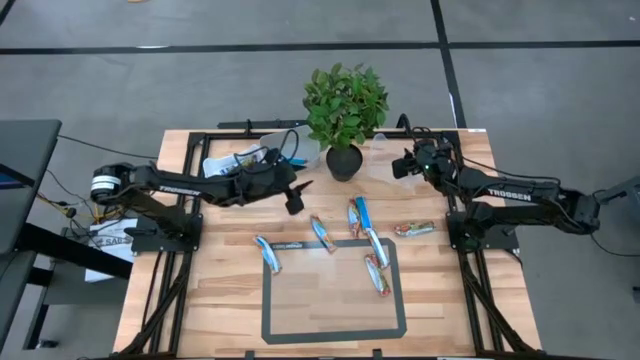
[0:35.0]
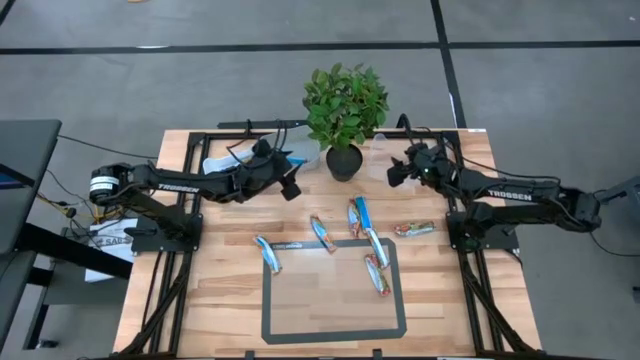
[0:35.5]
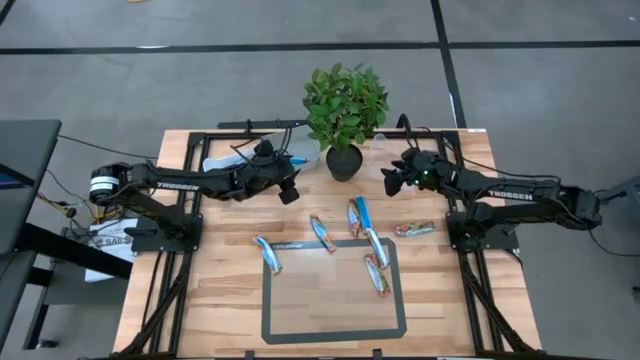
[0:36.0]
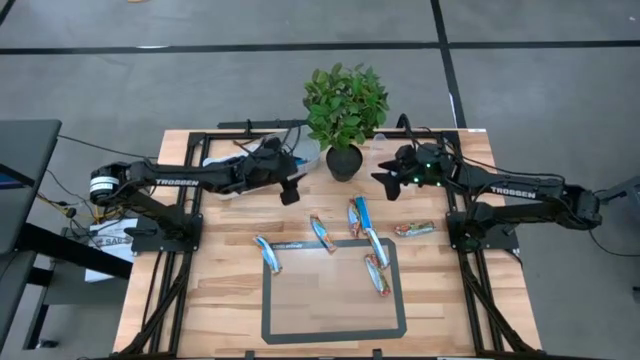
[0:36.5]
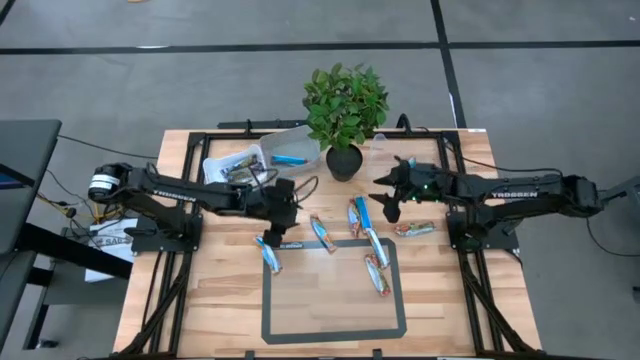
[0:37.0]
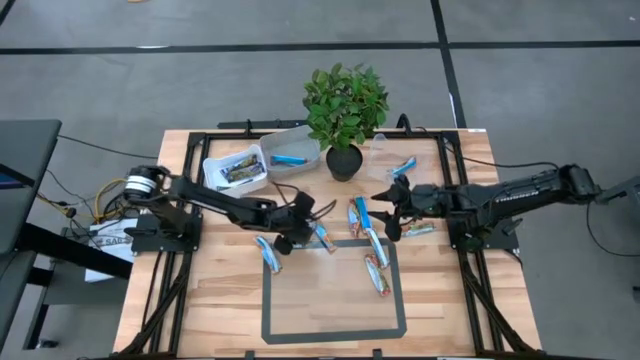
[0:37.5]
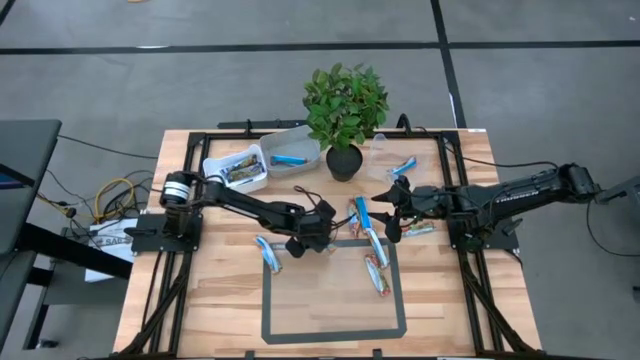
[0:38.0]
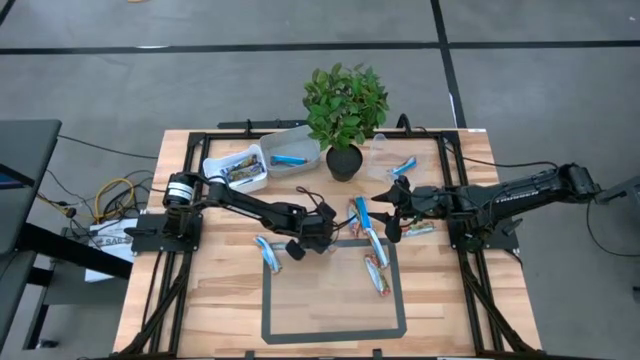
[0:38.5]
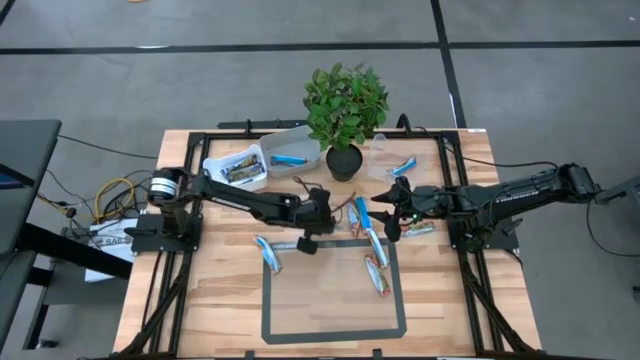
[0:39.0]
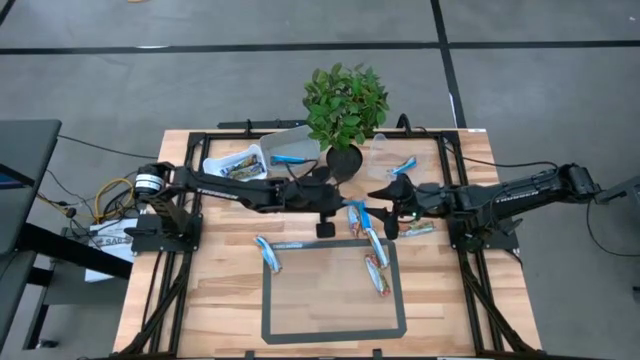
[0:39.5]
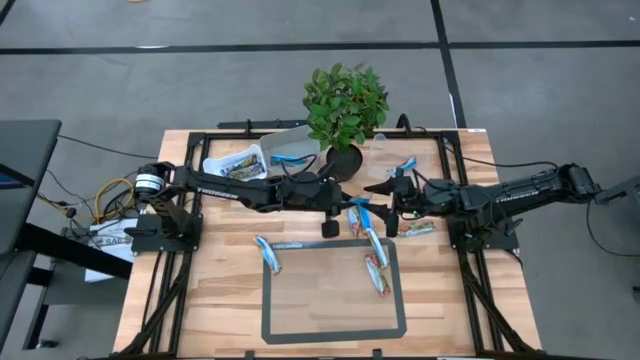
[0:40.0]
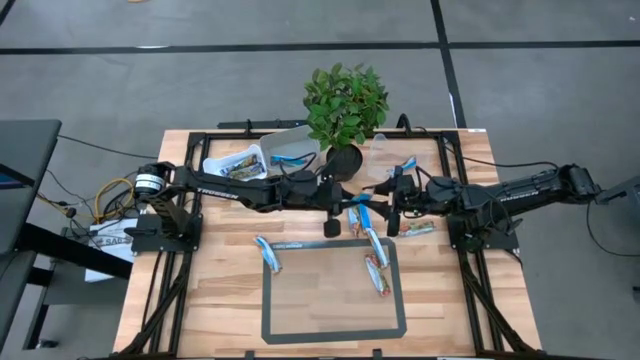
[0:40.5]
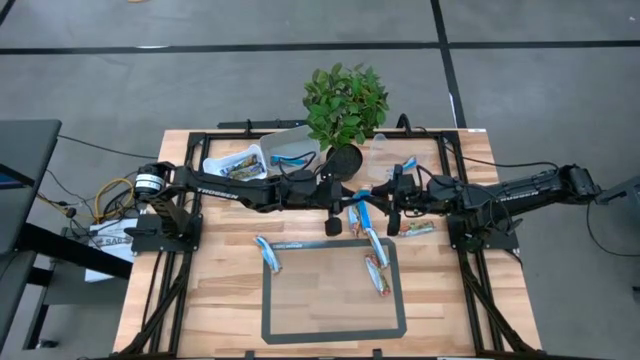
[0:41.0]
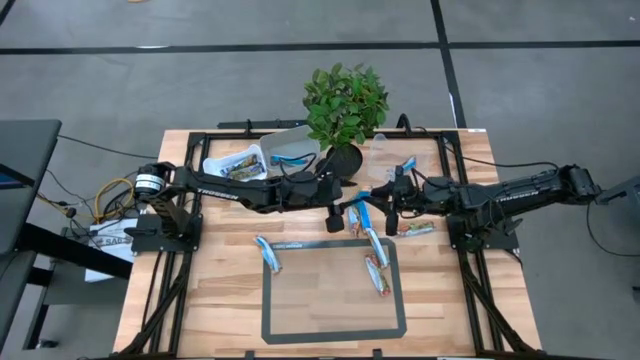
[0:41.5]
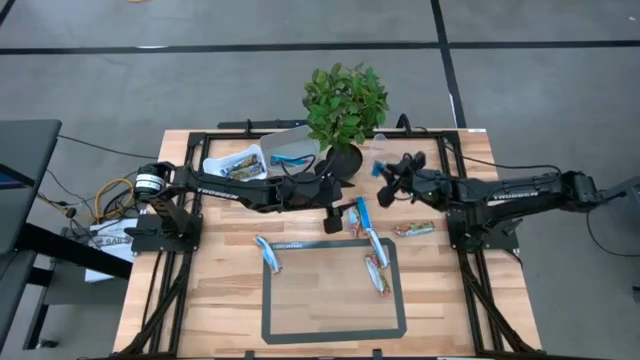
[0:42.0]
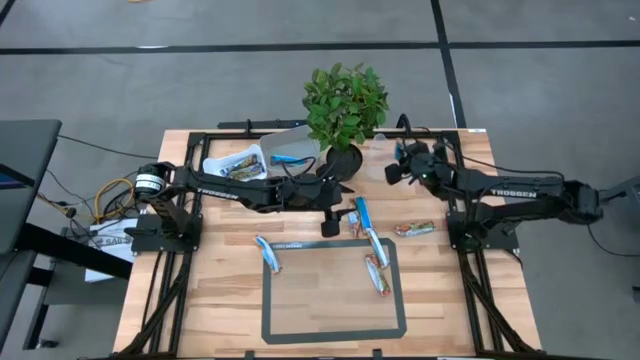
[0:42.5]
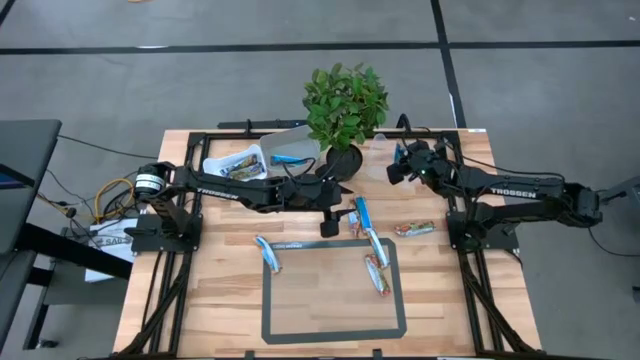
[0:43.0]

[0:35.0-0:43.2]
Task: Pick and place Granola Bars by type
Put the yellow granola bar into the transparent bin

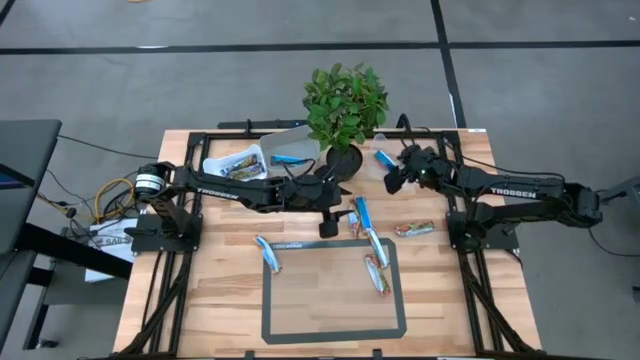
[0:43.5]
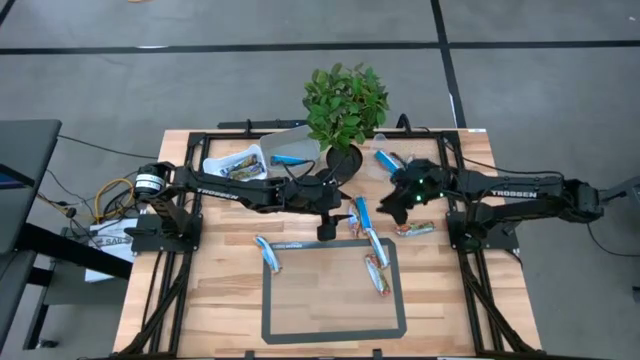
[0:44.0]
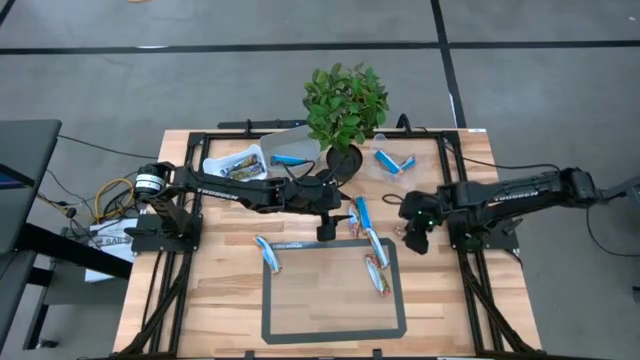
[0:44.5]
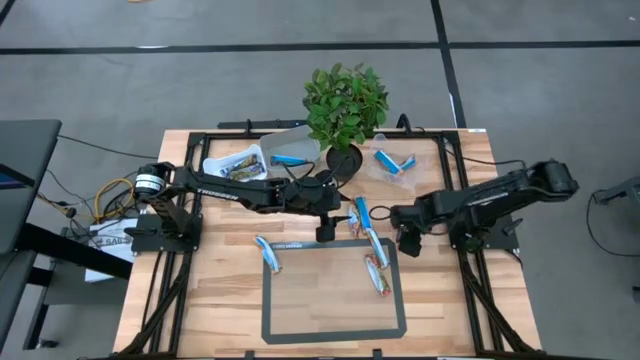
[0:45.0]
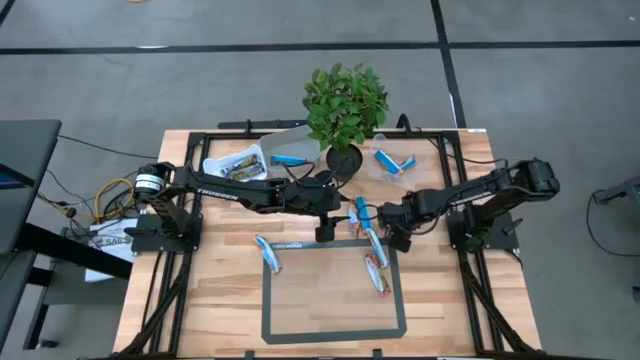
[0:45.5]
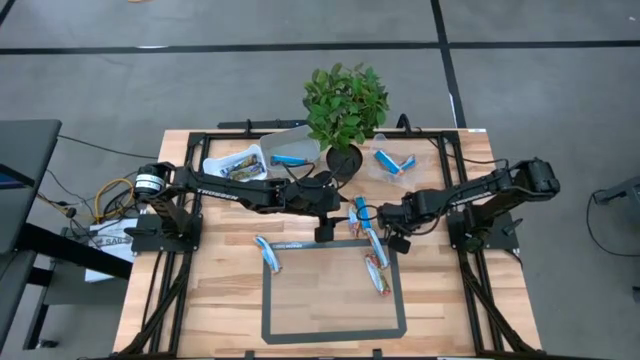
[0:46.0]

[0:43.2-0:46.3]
Put the red granola bar into the gray bin

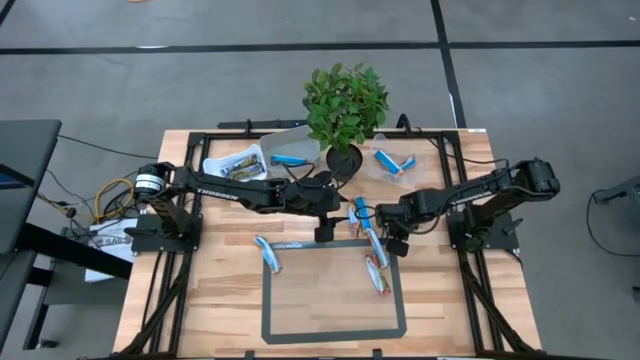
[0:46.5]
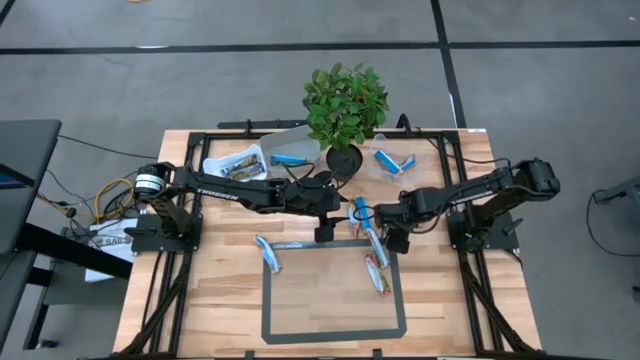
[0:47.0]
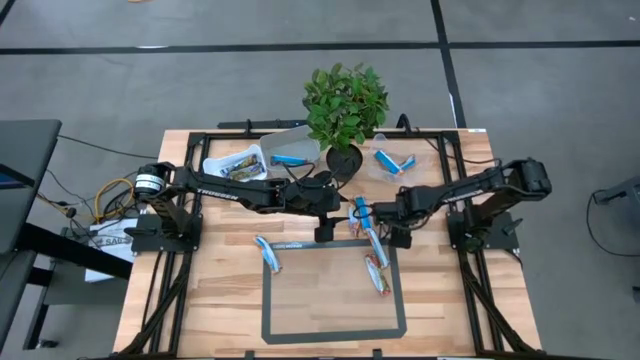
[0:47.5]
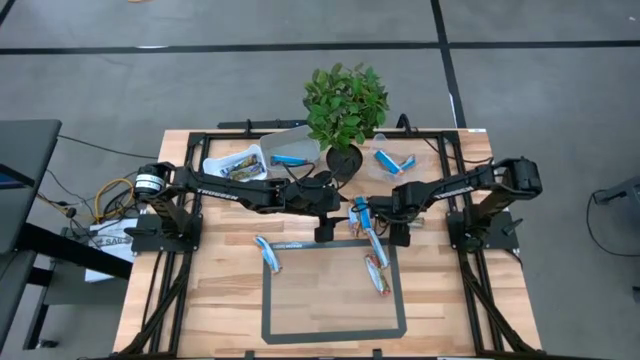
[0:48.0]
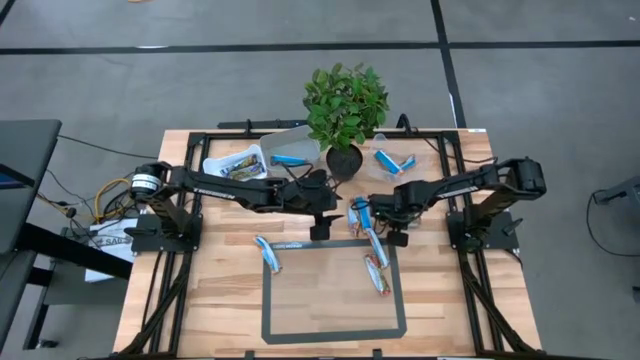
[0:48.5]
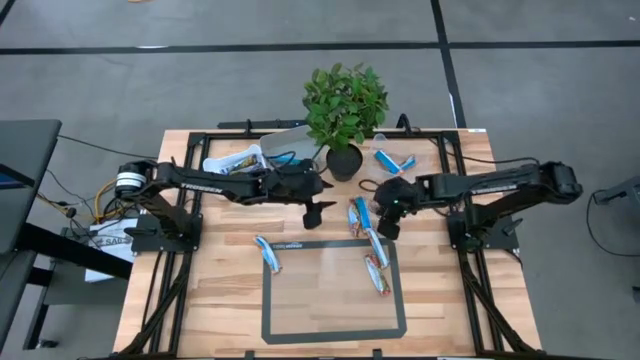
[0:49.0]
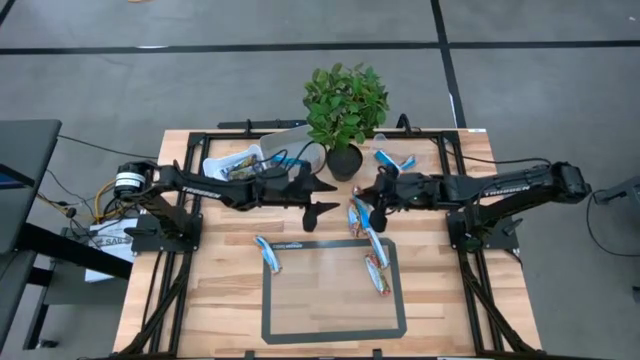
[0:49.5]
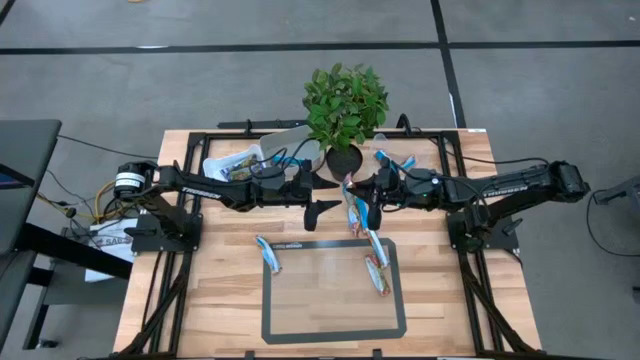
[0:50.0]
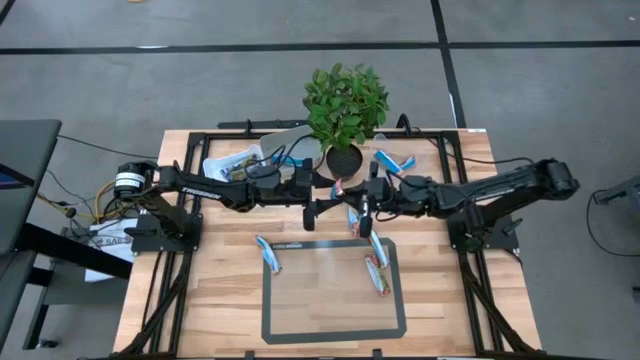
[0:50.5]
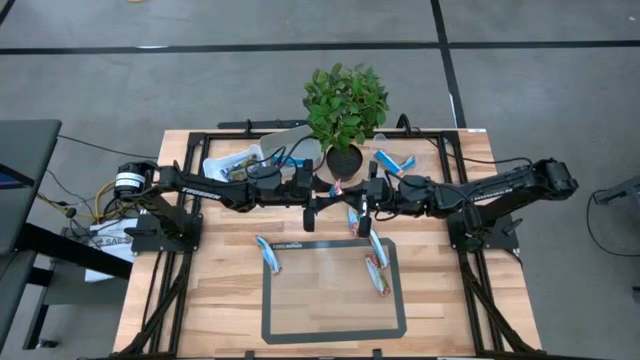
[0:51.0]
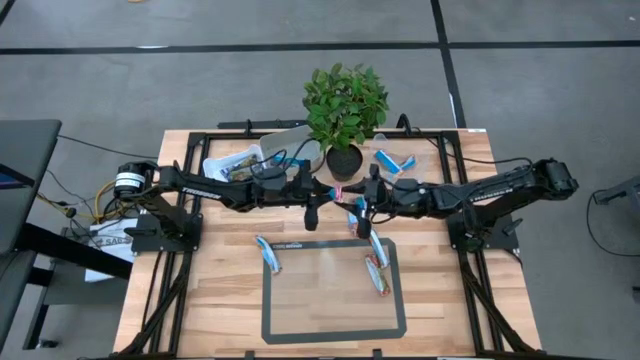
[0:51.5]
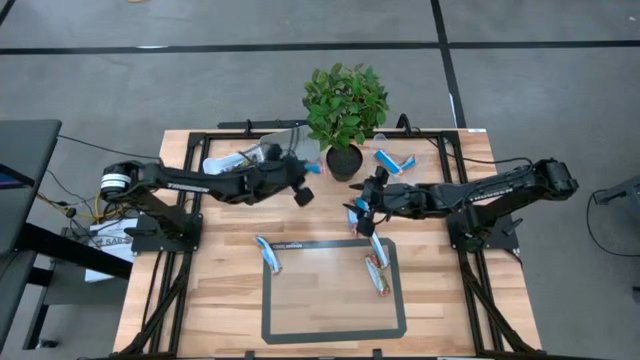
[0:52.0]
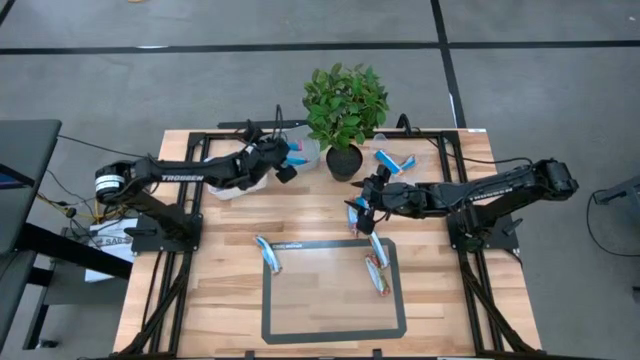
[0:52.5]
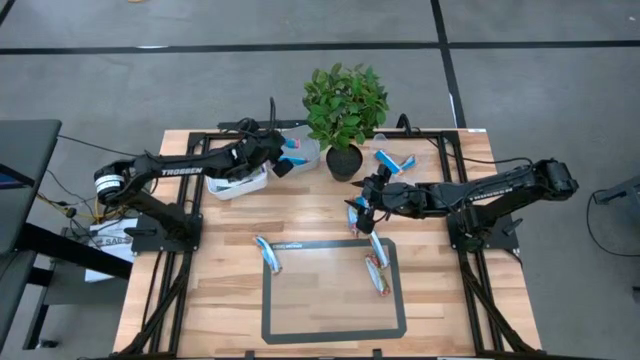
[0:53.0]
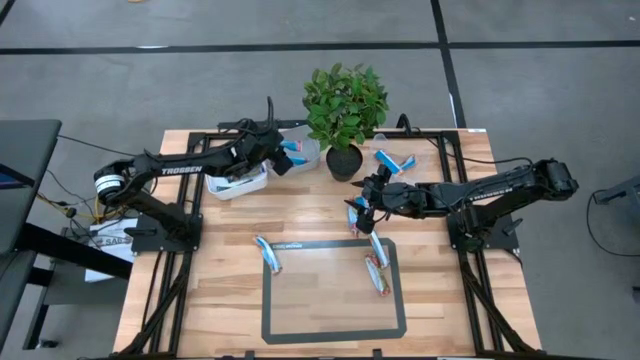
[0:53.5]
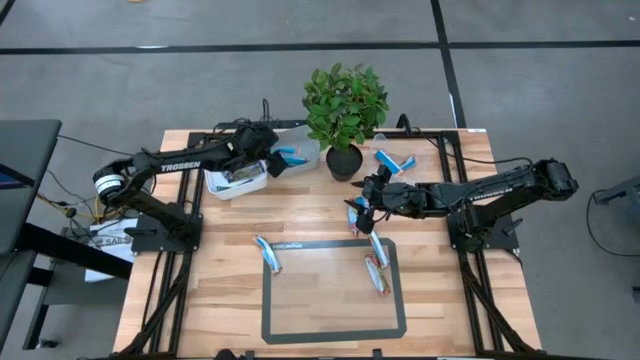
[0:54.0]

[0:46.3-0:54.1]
Put the red granola bar into the gray bin

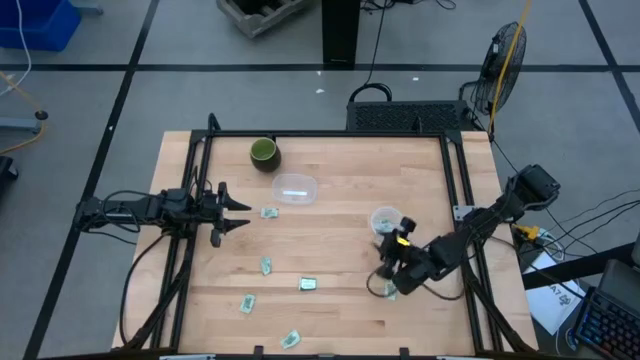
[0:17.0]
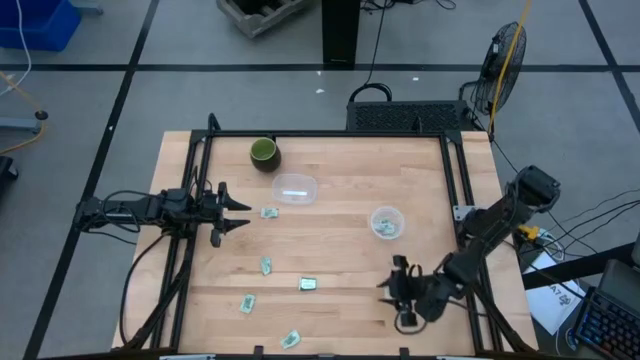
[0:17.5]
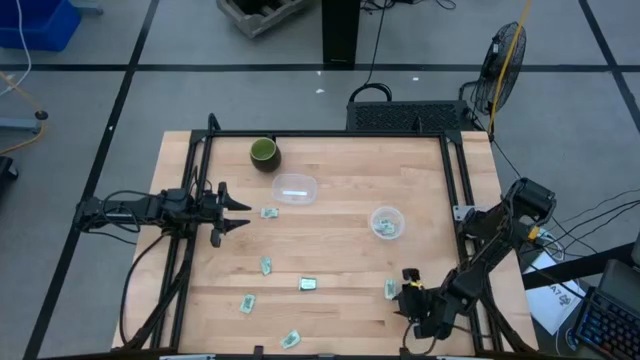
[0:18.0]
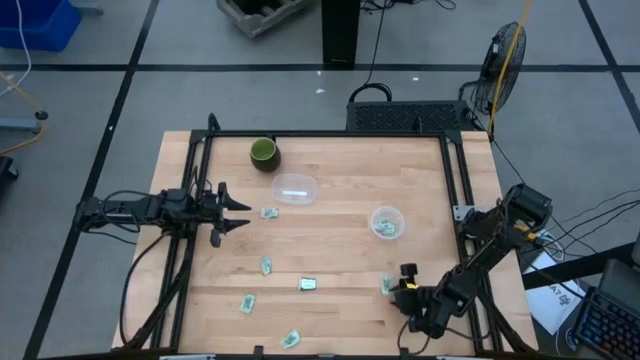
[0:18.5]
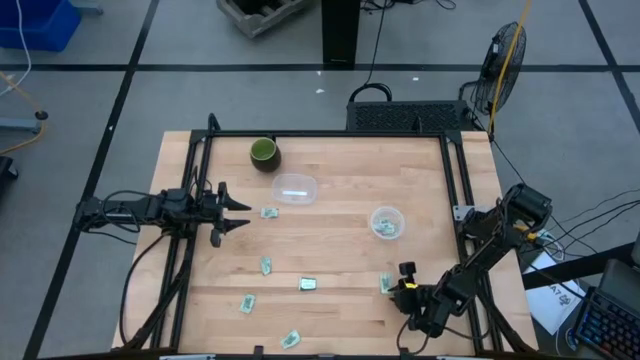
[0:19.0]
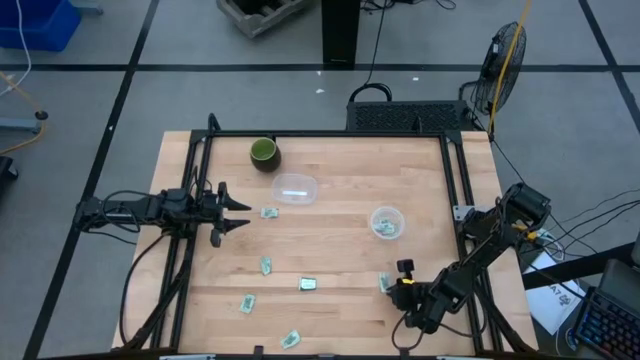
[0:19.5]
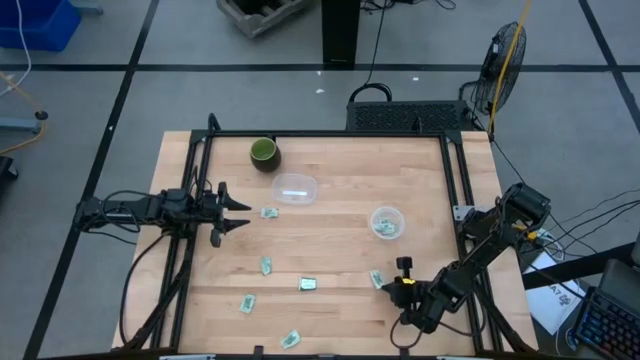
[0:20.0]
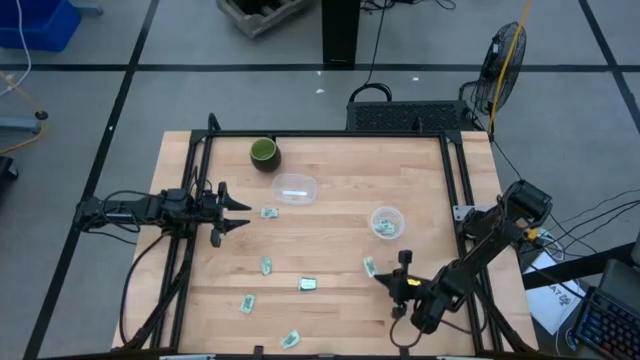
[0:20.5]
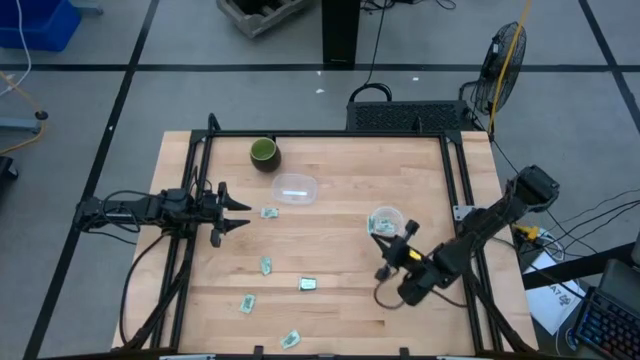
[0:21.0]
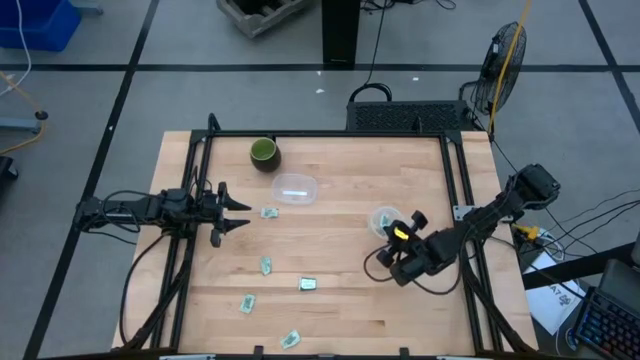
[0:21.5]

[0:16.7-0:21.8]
Task: Pick and place items into bin
Put the light green stevia packet into the right transparent bin
